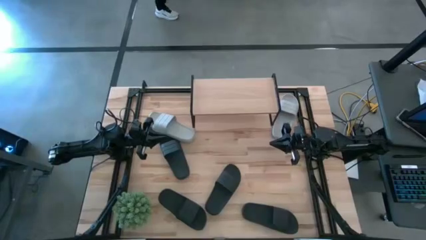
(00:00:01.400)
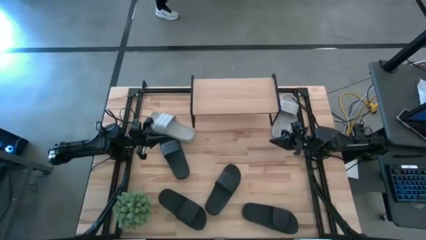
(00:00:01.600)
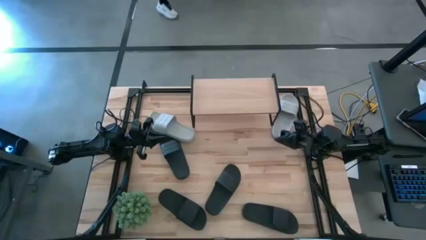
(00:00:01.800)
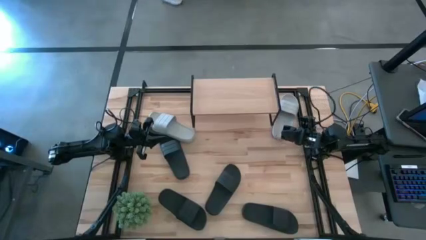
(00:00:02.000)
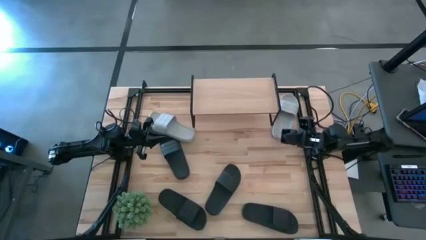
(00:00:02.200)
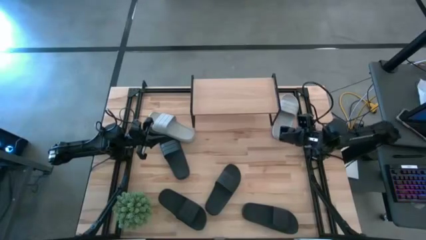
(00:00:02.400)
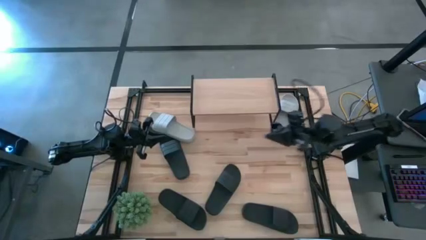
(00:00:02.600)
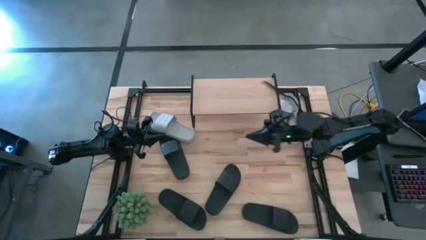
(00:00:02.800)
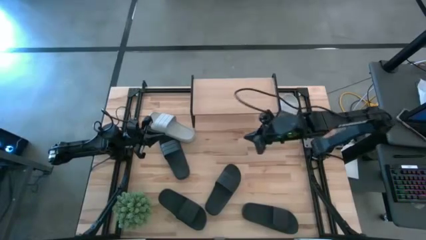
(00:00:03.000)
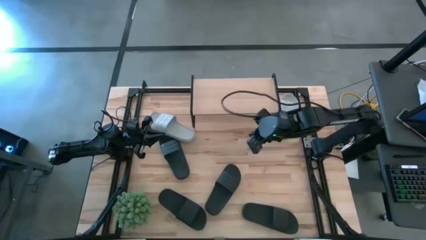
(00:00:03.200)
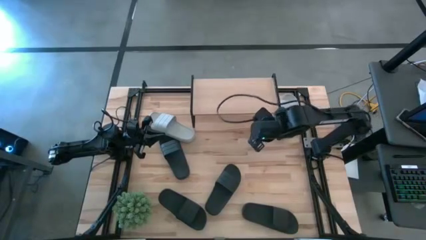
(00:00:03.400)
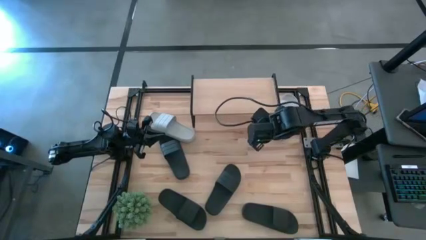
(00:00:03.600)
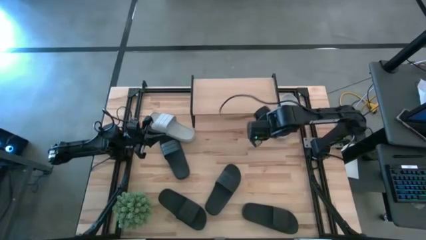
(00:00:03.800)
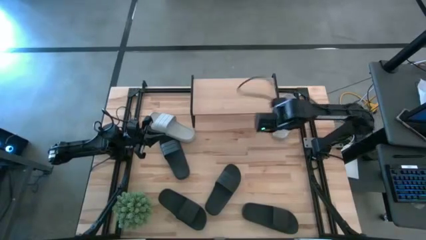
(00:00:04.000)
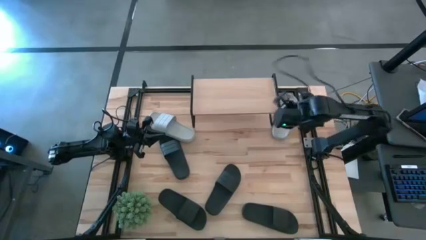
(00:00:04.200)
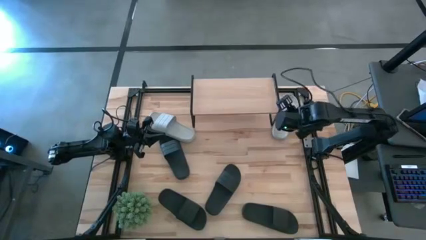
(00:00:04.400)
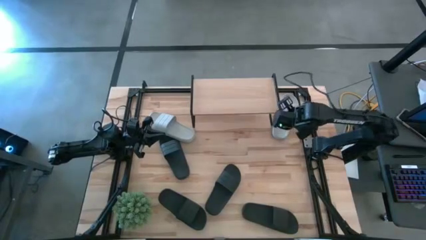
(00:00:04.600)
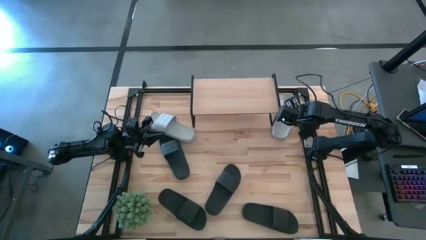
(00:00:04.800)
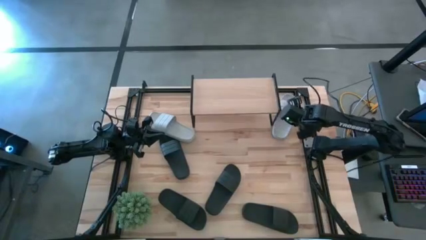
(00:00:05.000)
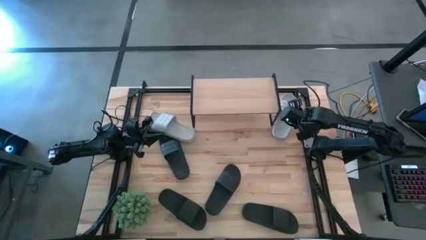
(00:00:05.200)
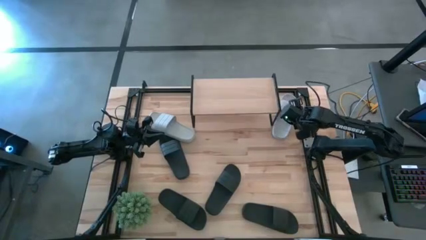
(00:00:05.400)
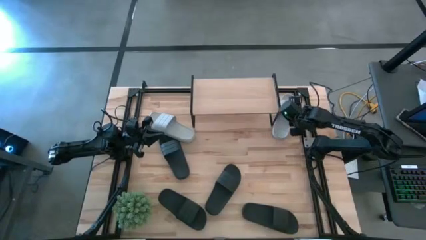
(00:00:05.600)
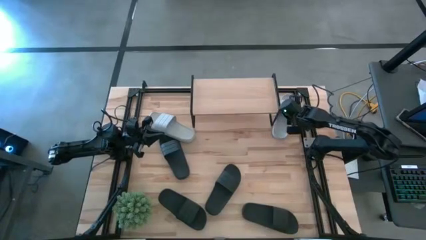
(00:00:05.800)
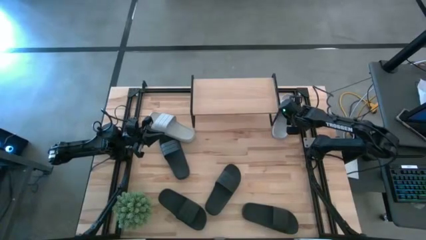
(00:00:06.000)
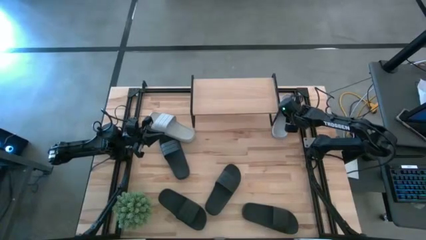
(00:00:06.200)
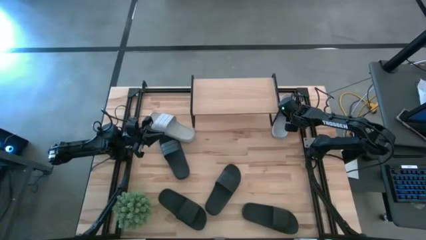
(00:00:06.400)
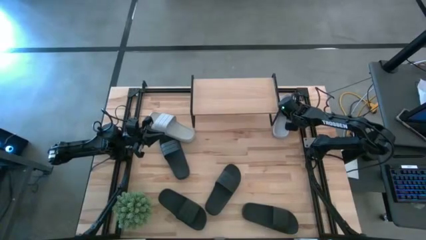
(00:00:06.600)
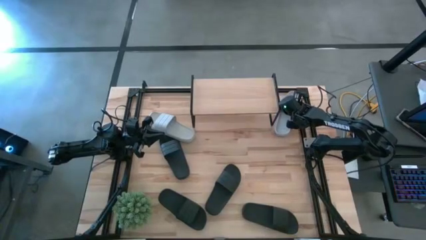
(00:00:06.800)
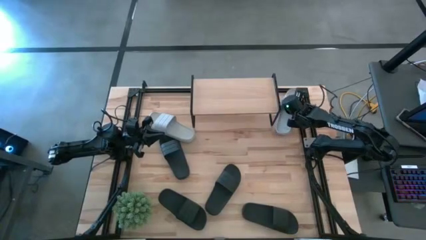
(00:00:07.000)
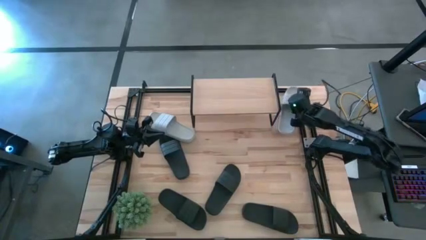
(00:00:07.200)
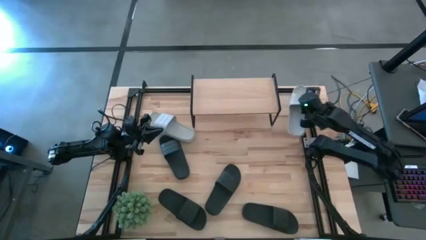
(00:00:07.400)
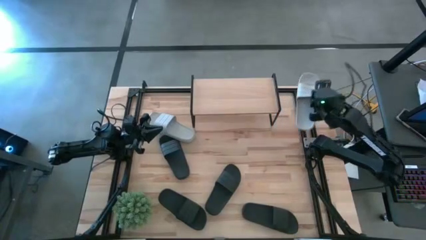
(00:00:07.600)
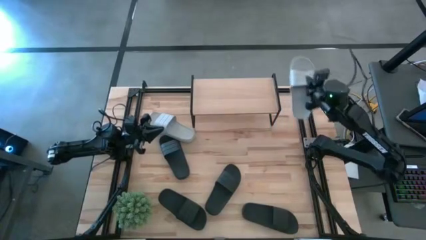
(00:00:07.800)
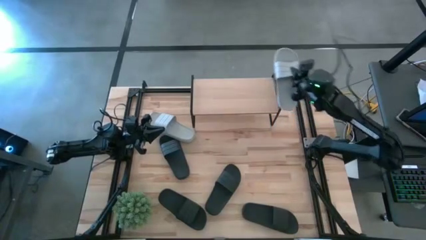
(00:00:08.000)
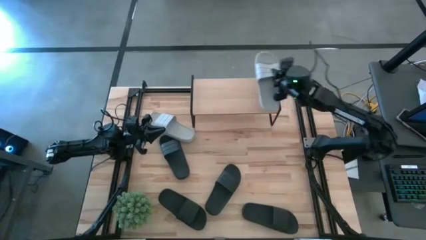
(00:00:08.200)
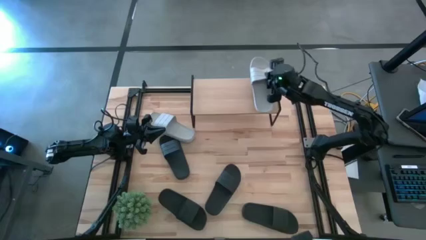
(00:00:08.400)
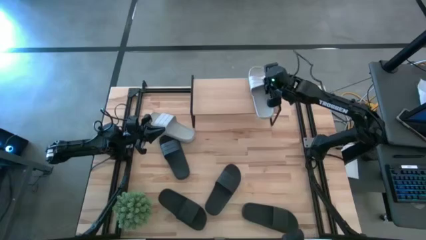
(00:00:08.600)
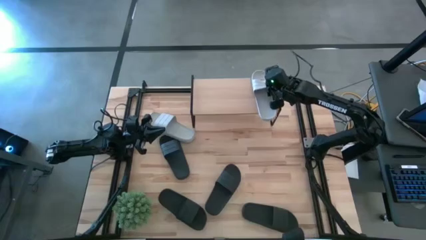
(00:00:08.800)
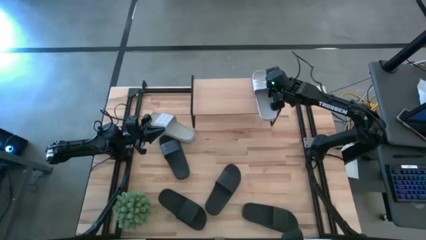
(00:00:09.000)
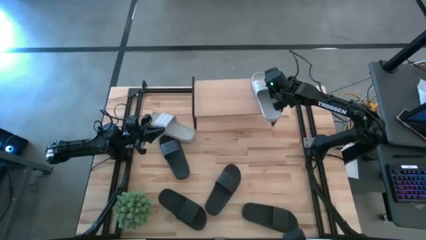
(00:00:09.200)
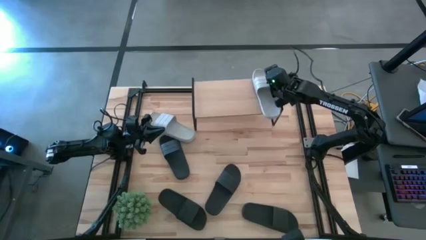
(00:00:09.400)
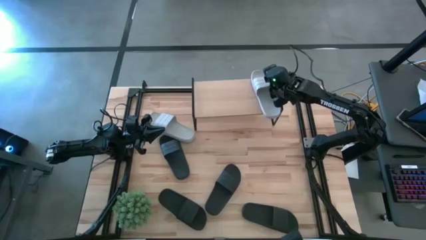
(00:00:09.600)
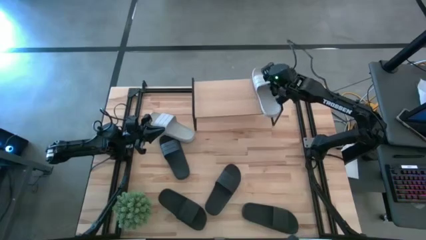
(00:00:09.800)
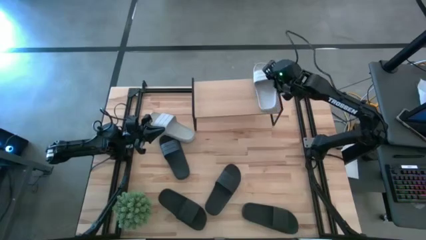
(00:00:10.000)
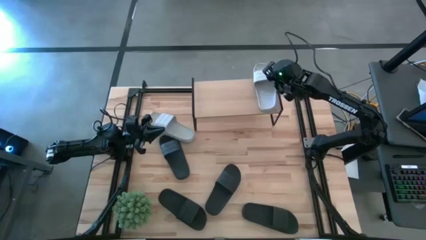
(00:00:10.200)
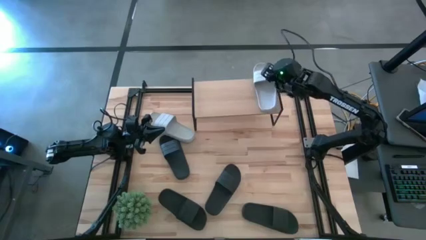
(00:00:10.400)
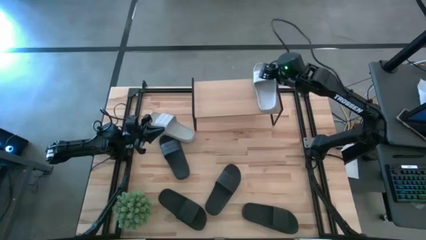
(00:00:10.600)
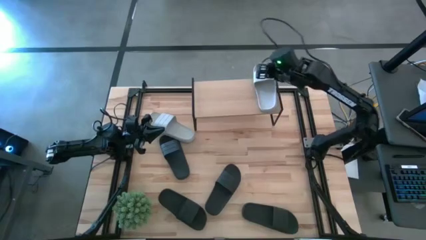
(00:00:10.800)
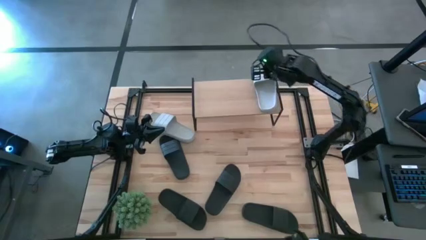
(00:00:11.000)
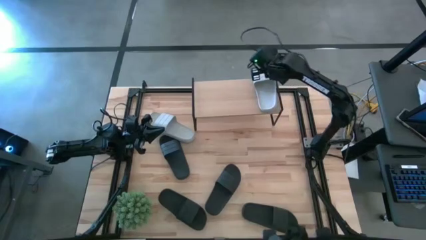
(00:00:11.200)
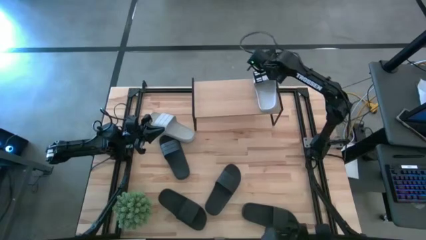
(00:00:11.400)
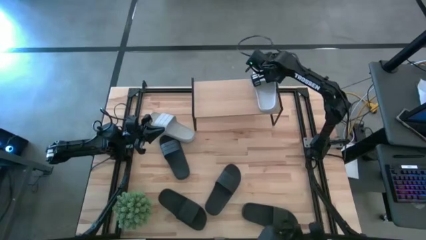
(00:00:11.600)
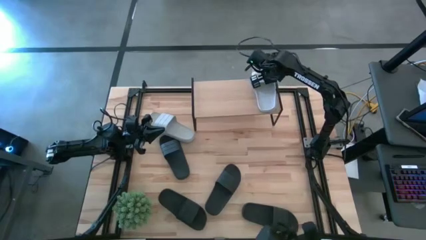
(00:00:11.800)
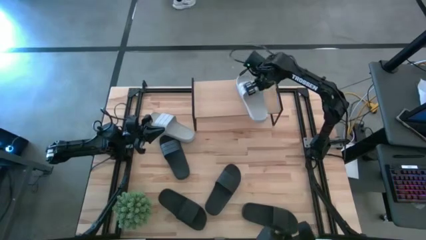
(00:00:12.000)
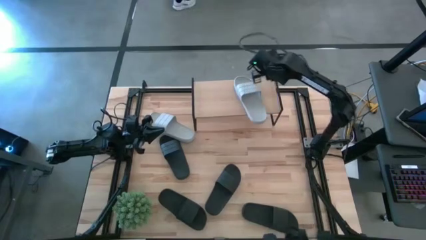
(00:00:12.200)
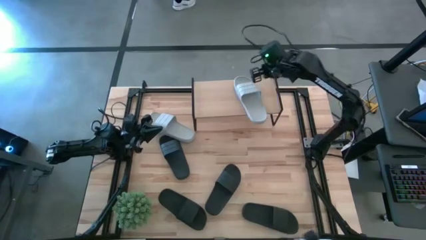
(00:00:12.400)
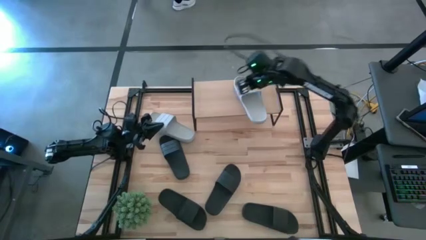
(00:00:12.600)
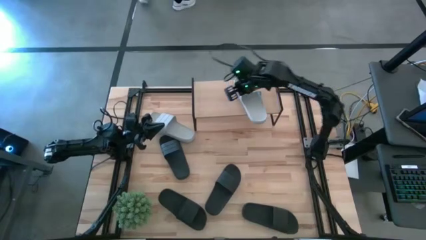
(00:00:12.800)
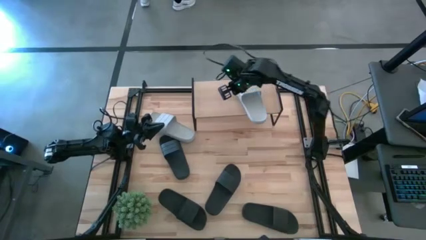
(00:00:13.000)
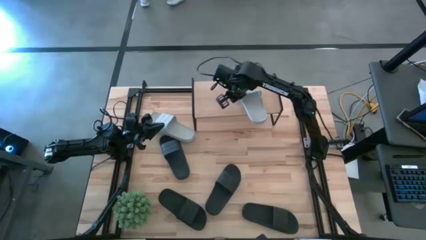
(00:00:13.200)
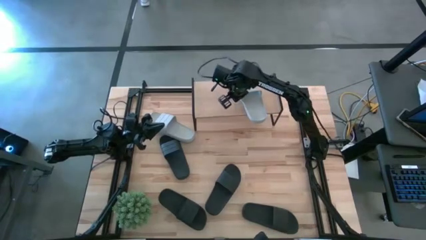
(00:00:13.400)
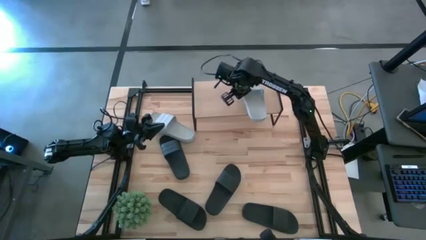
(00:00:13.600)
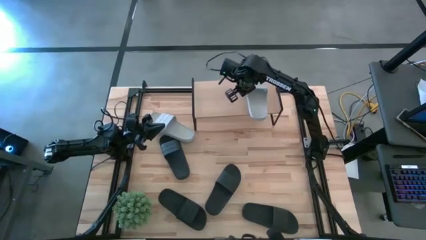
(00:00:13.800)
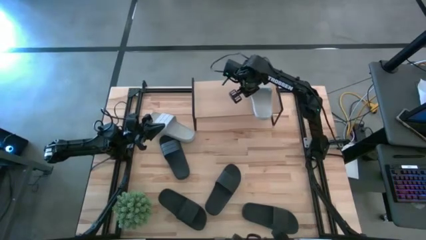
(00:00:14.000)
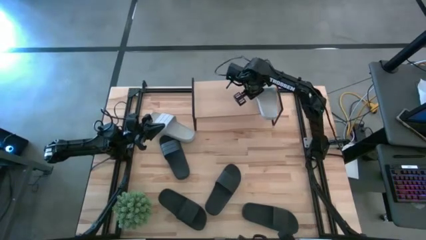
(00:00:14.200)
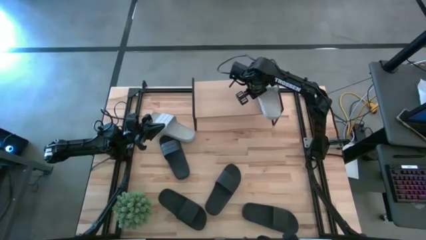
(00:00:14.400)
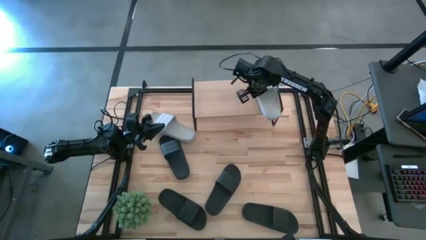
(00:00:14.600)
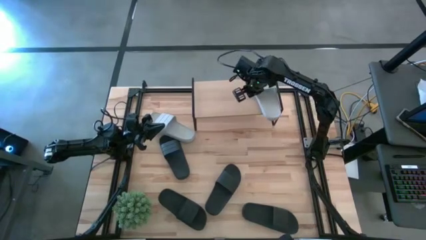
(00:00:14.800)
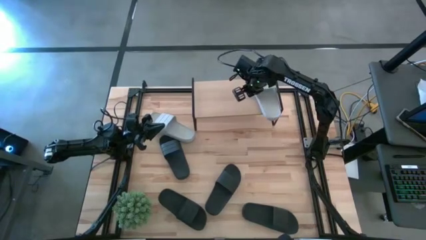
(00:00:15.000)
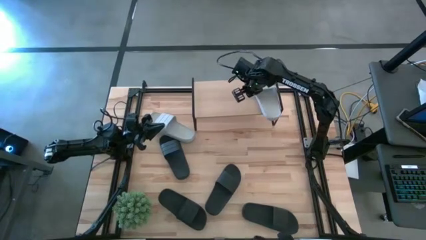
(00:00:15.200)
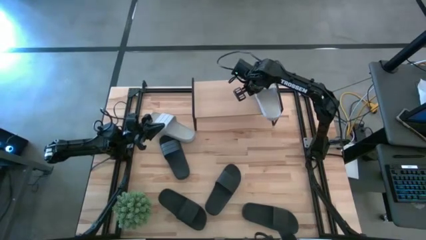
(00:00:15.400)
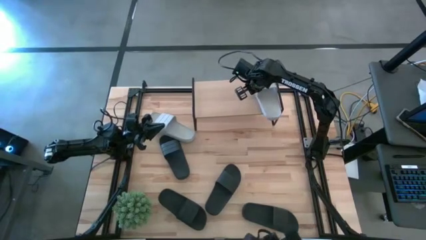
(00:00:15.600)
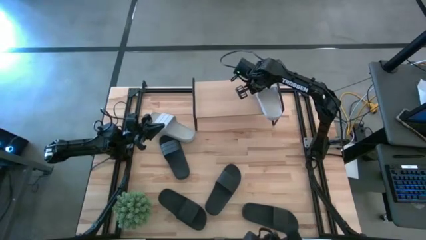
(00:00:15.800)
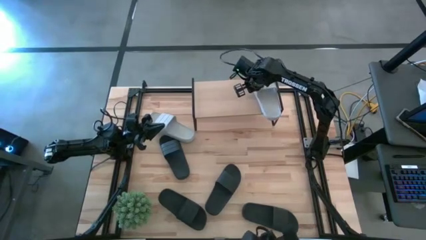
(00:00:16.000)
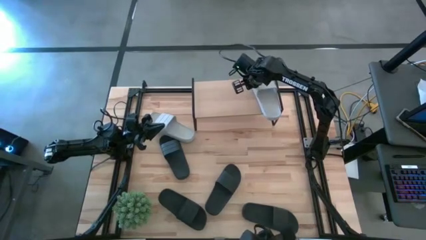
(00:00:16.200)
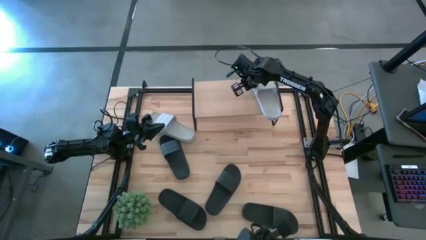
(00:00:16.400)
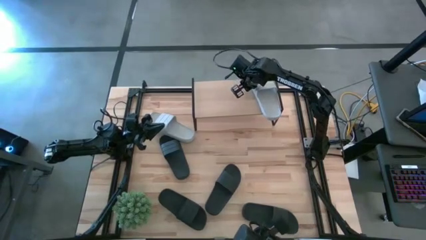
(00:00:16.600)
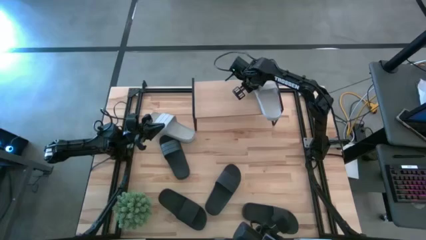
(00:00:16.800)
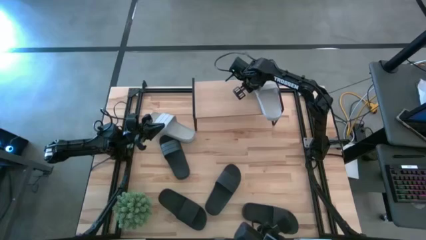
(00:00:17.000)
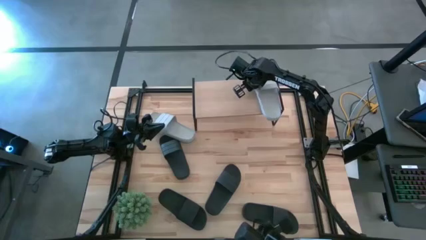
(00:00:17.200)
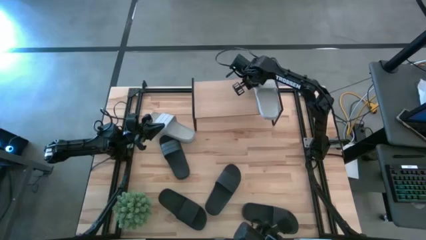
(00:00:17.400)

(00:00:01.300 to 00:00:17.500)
Task: Pick and place slides into the shelf
Put the gray slide on the shelf
